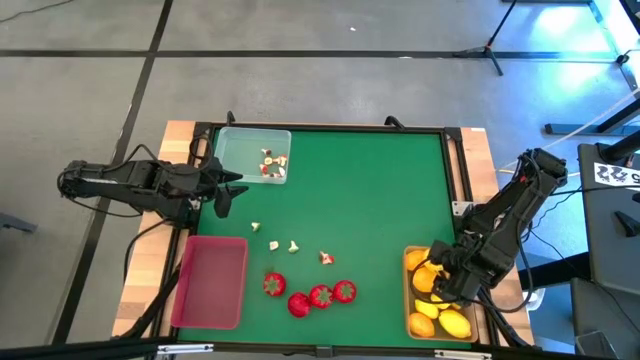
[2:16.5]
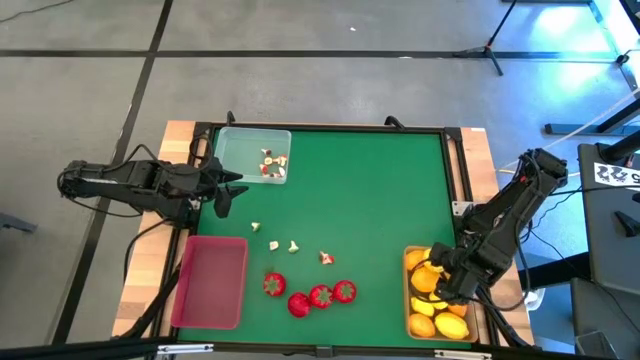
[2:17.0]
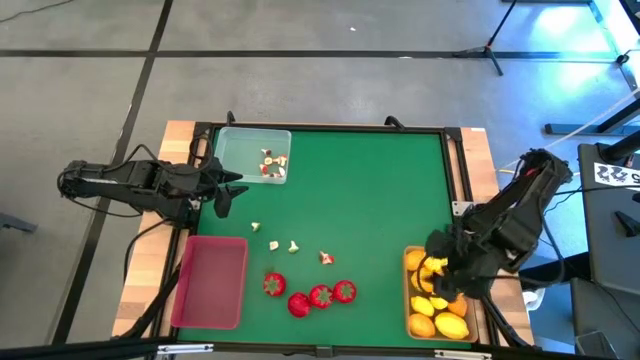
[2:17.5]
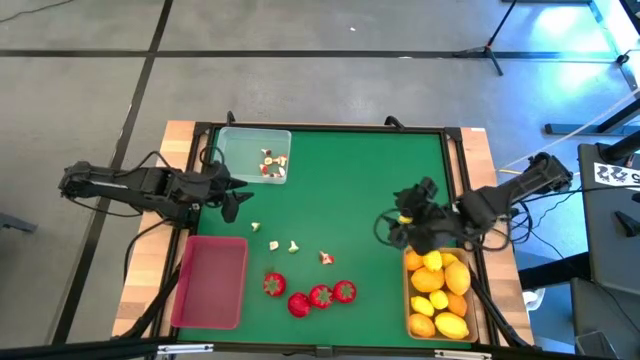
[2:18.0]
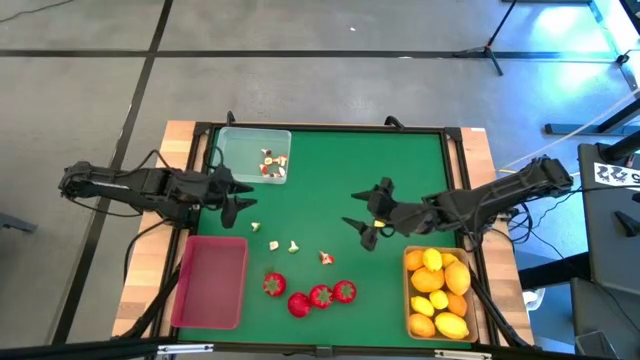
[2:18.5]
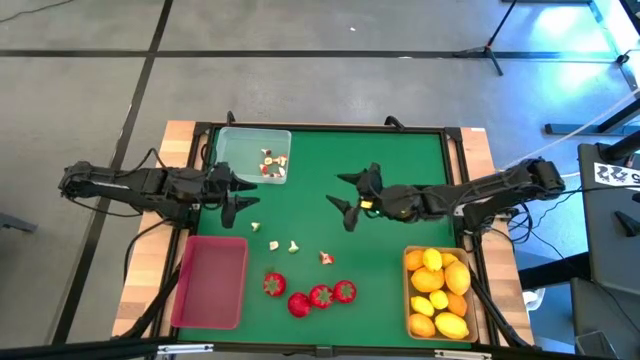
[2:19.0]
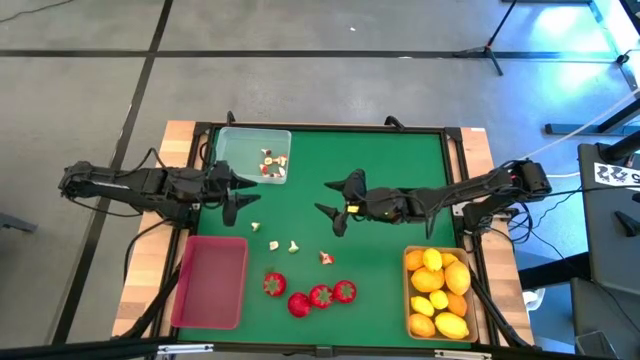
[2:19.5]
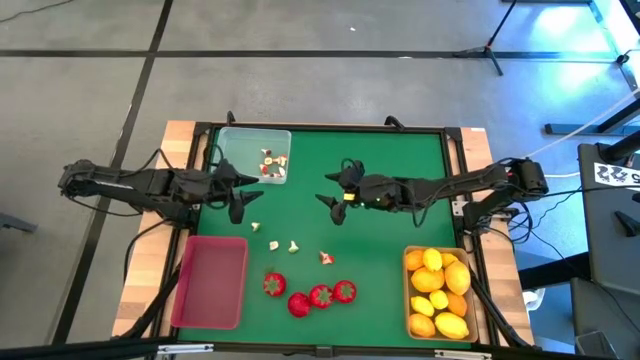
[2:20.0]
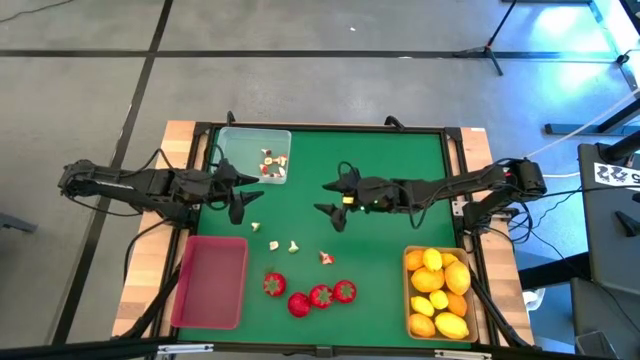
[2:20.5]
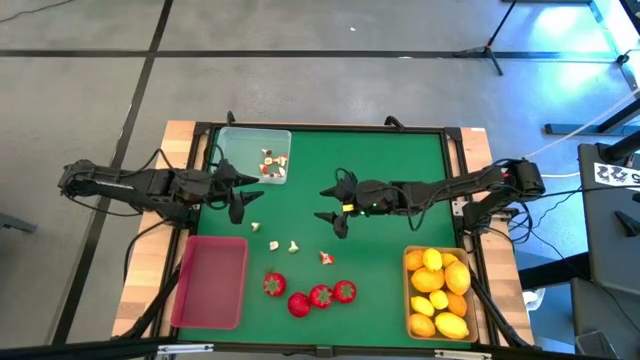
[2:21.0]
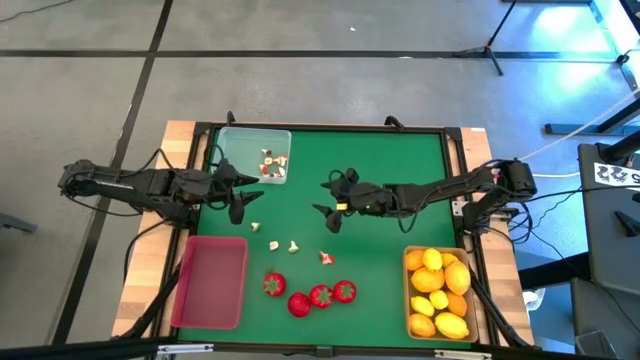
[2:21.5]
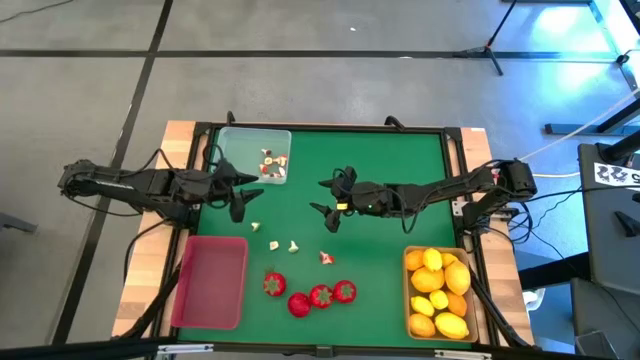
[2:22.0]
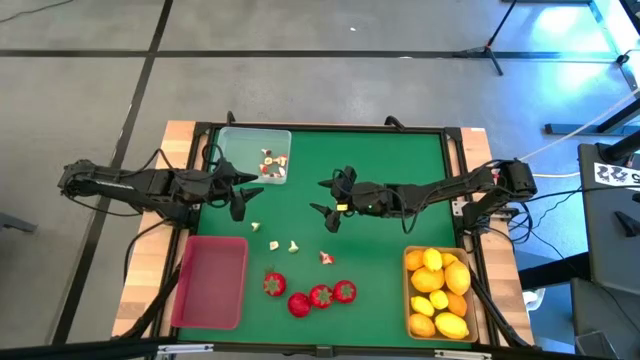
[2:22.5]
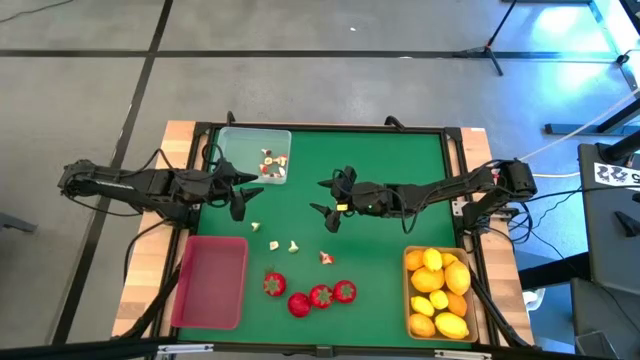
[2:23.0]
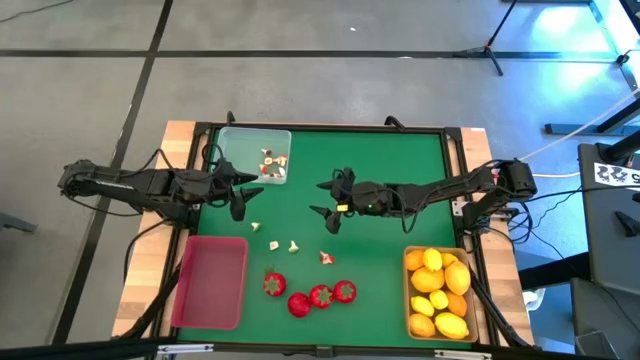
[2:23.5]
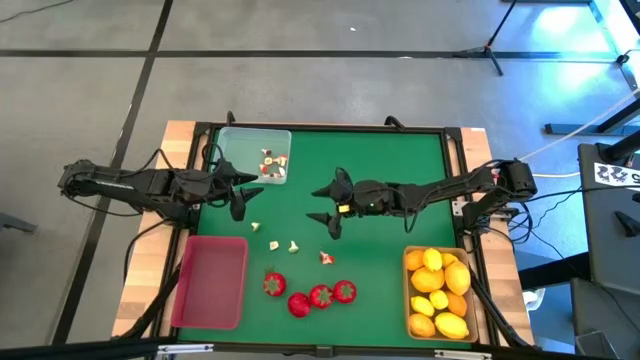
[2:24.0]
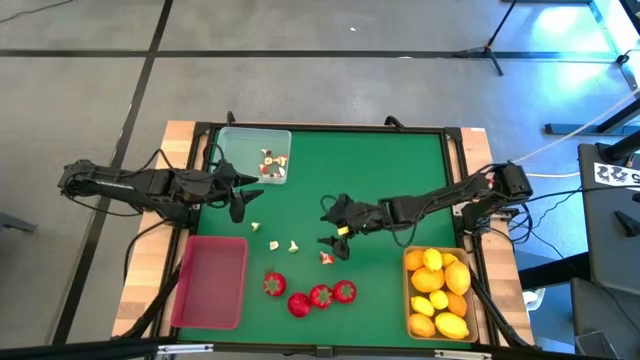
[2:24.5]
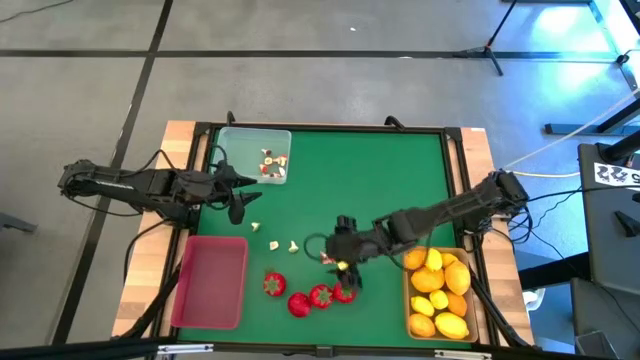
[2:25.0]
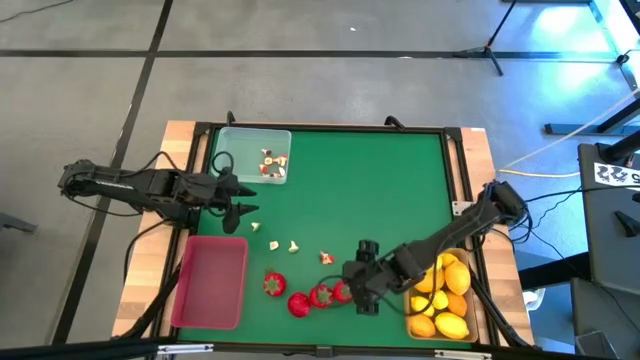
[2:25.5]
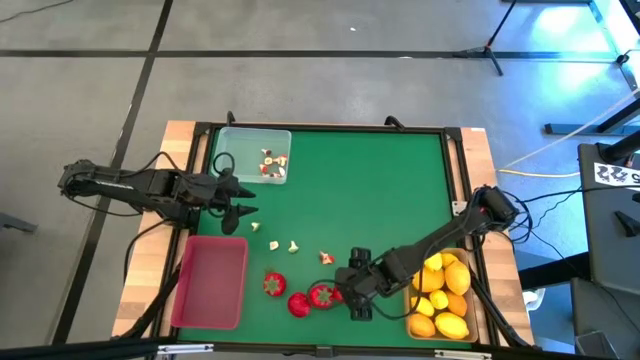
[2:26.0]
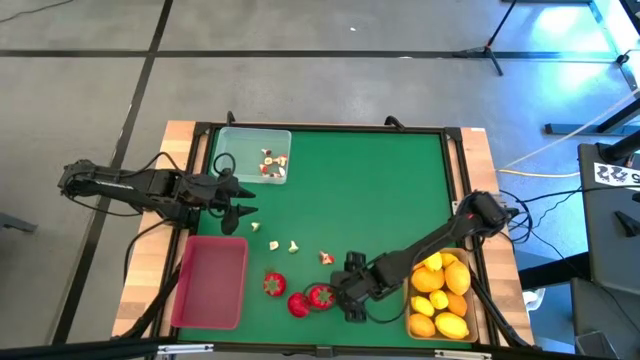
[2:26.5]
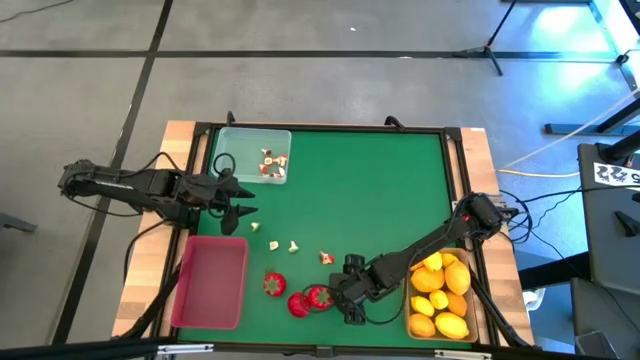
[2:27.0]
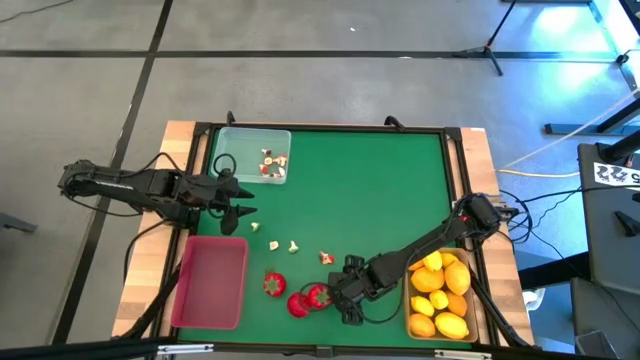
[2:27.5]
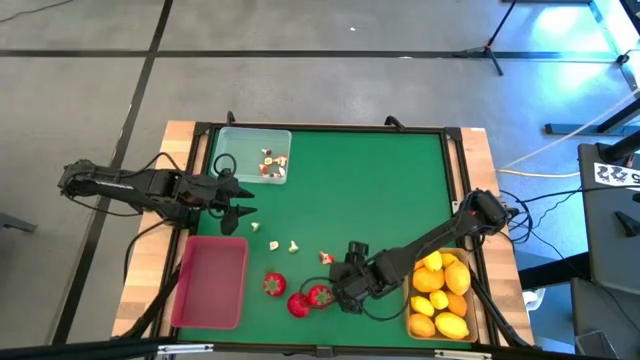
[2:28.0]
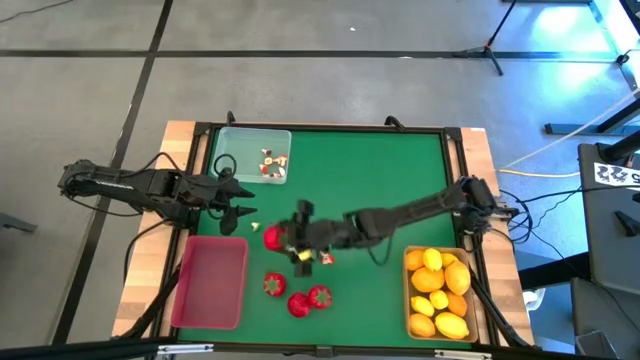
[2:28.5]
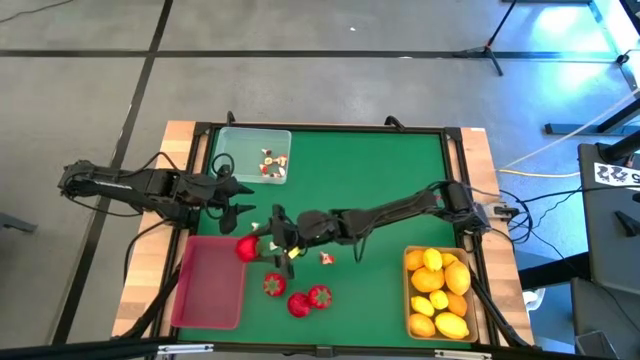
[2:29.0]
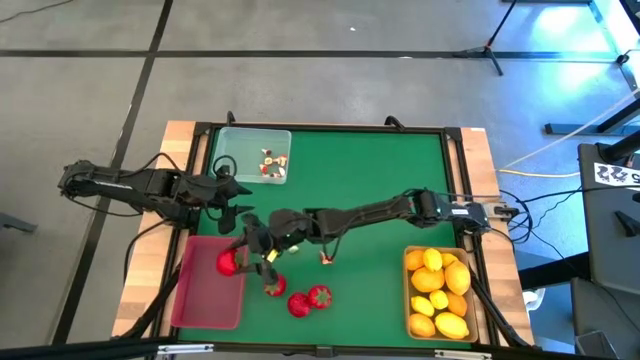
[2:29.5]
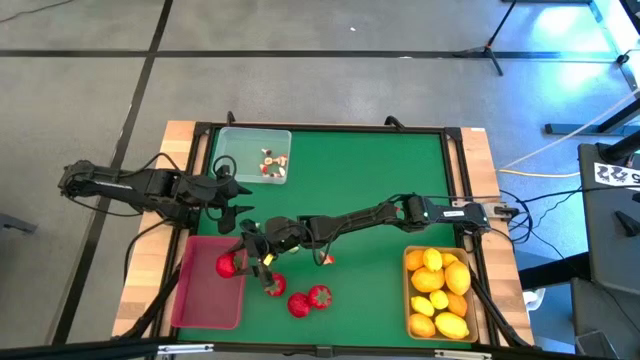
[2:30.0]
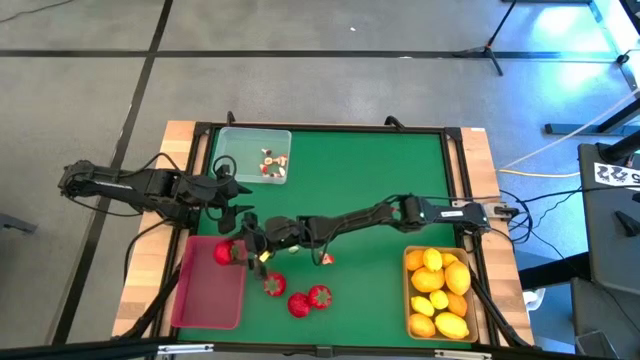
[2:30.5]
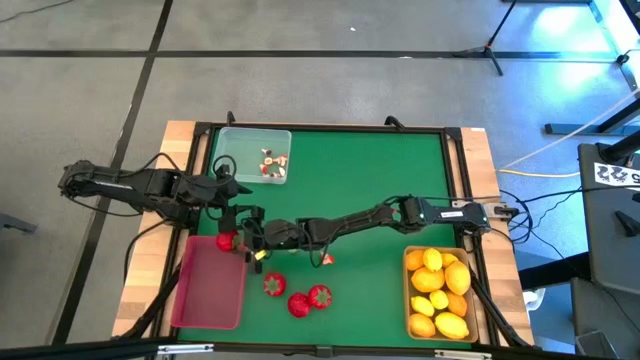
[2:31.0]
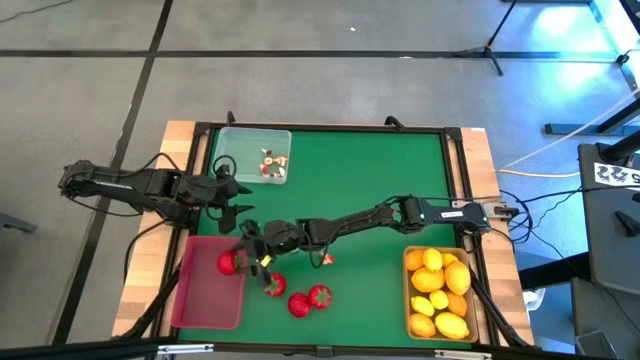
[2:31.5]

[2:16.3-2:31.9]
Task: Sort produce into baskets
Put the tomato into the pink bin

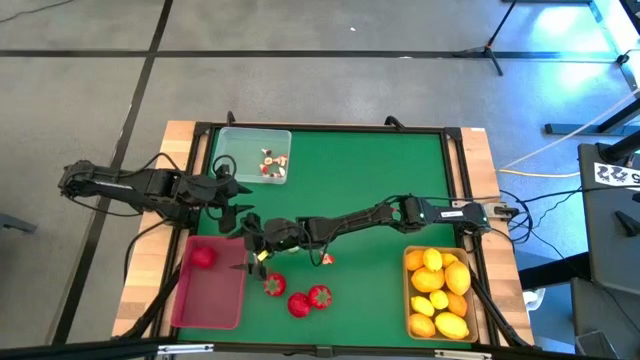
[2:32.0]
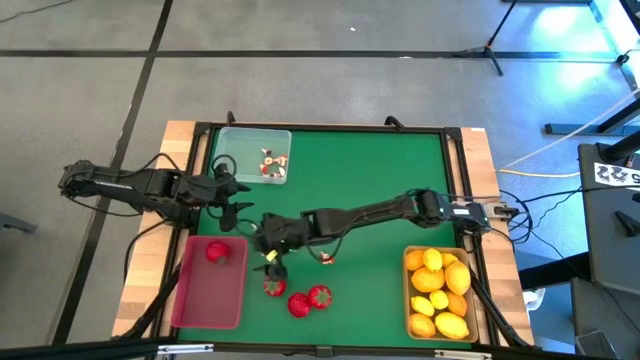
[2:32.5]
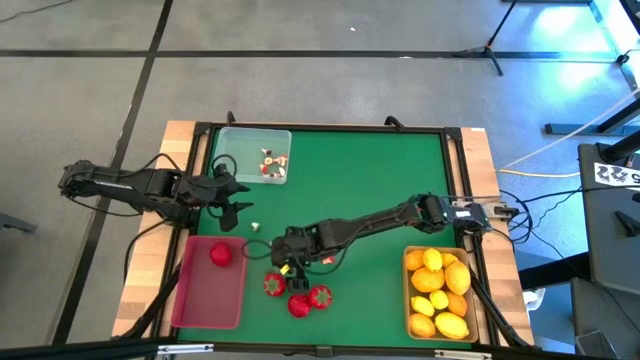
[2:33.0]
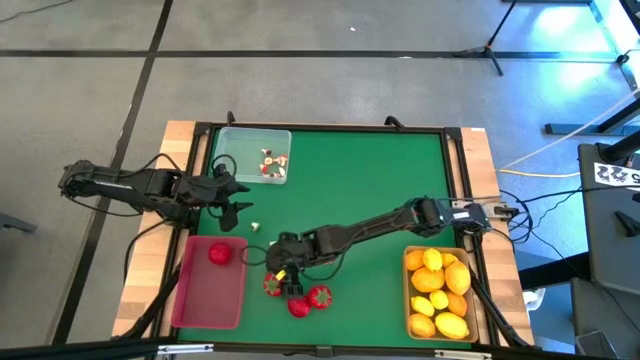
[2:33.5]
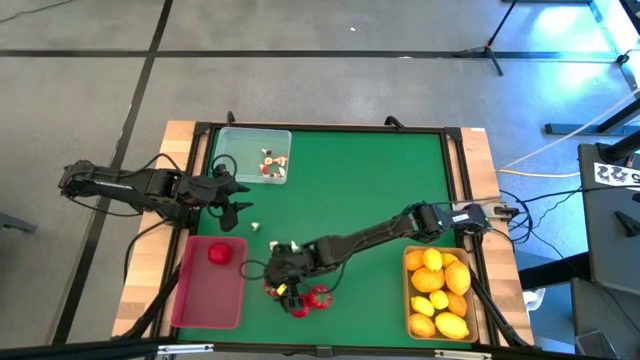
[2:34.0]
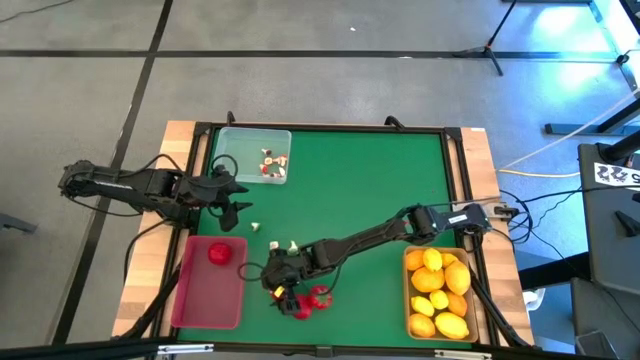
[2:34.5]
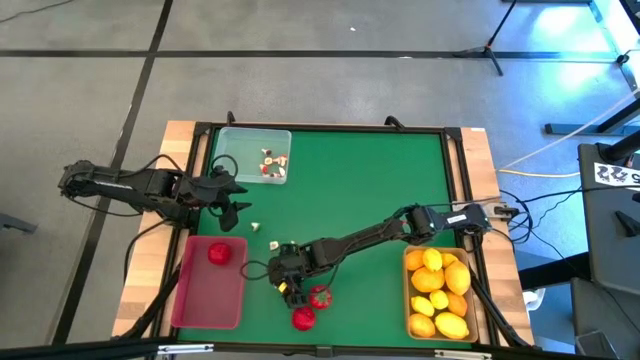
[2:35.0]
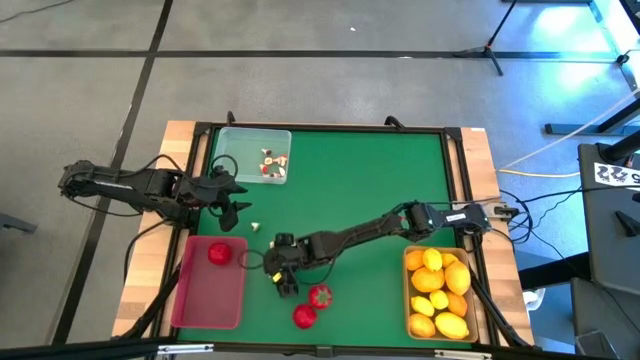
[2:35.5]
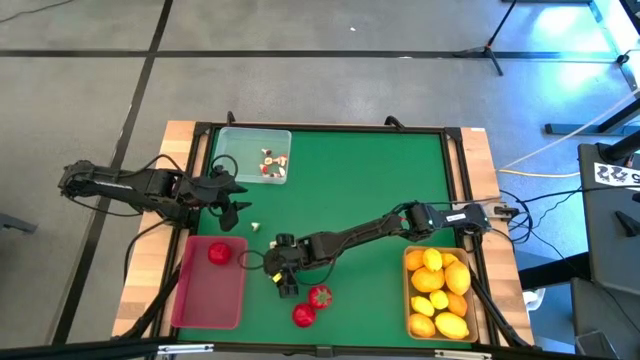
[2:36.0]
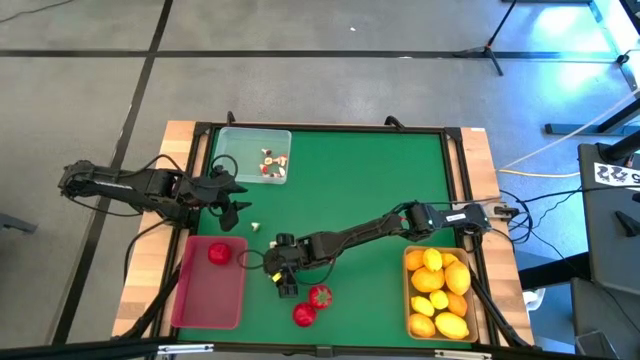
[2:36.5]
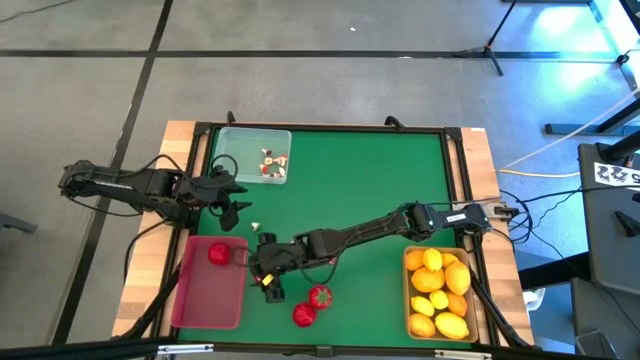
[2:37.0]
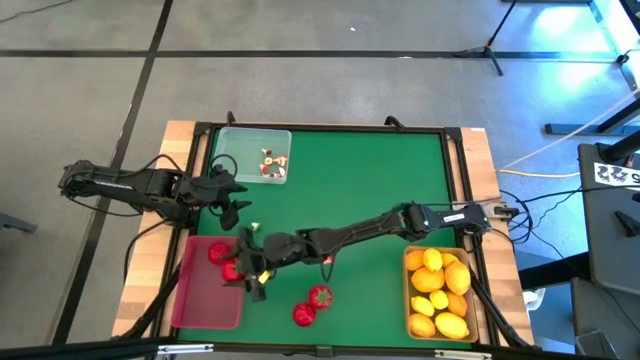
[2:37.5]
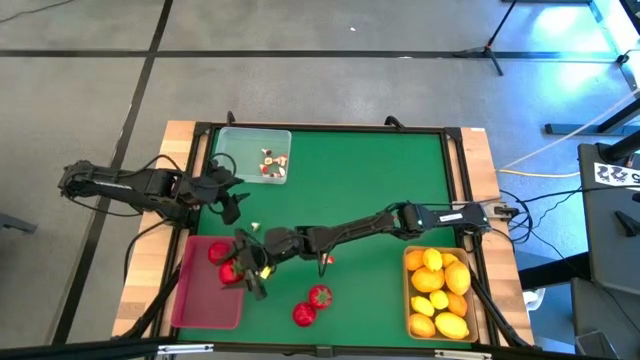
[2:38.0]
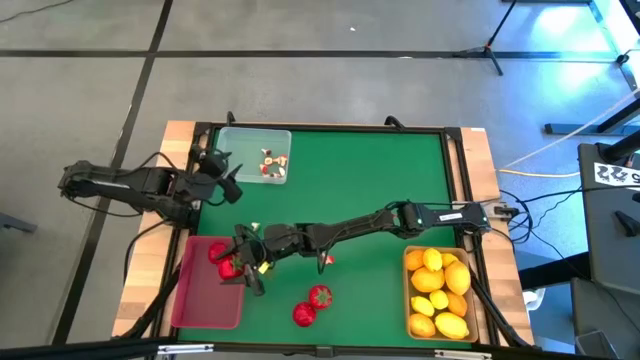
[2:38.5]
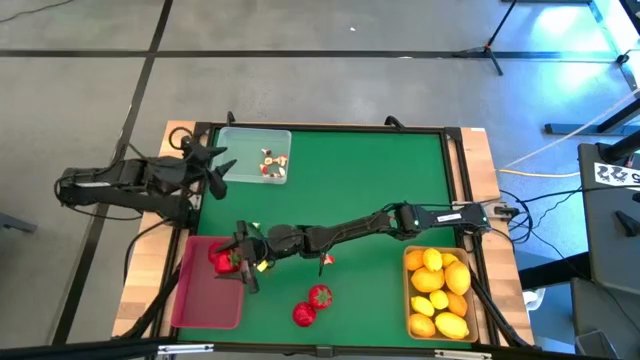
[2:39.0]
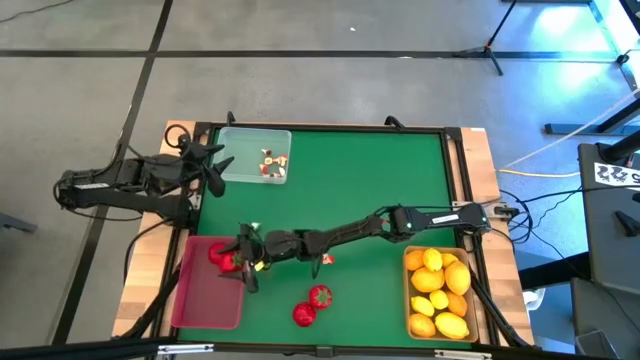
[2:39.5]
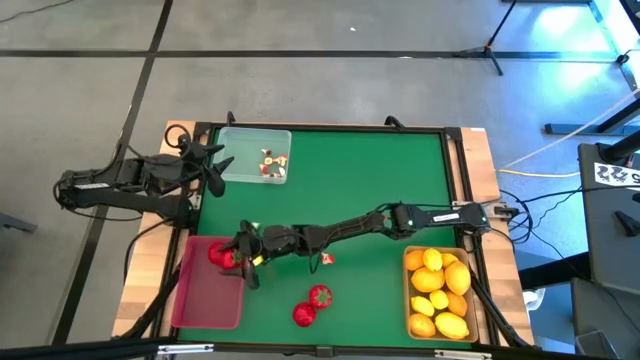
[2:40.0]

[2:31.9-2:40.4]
Put the tomato into the pink bin
